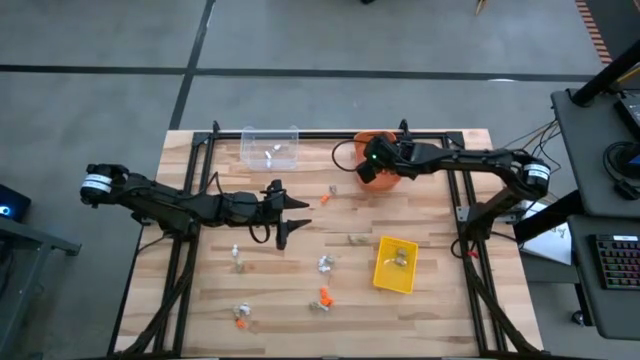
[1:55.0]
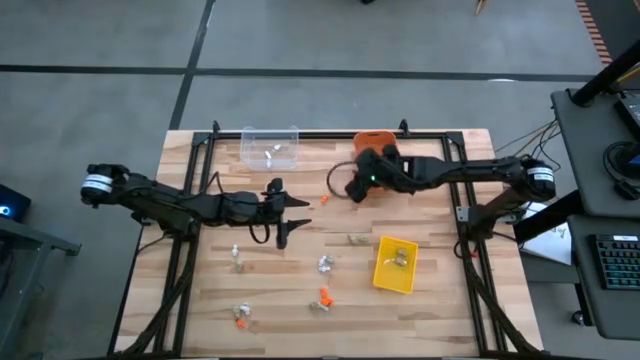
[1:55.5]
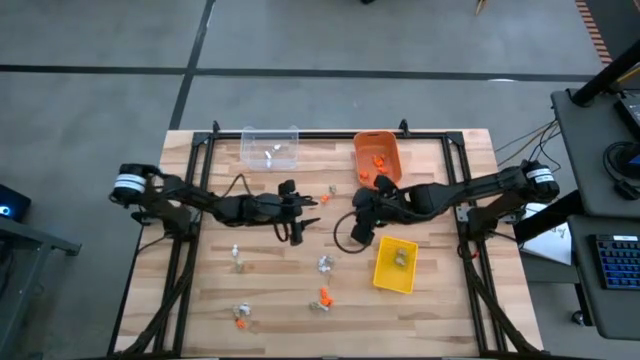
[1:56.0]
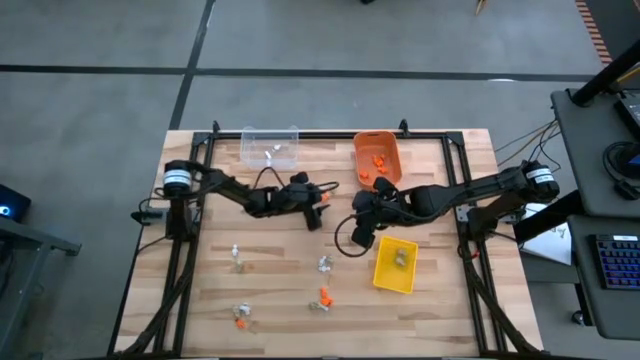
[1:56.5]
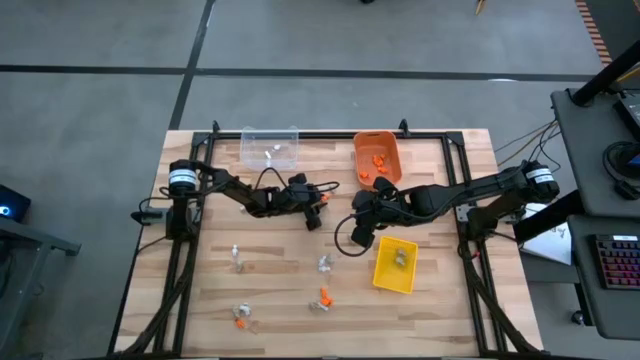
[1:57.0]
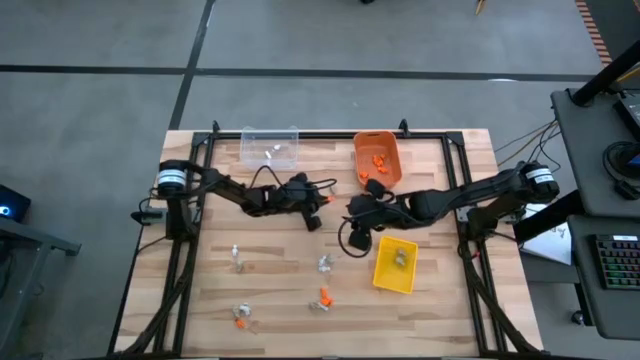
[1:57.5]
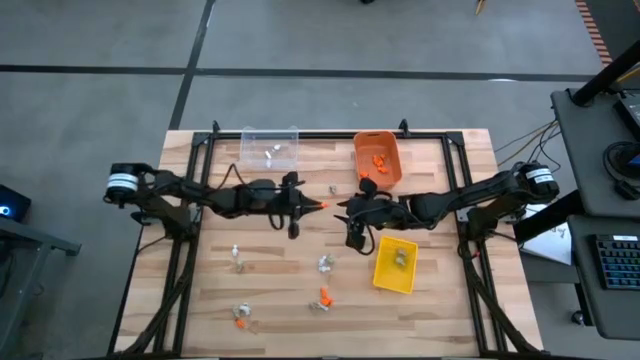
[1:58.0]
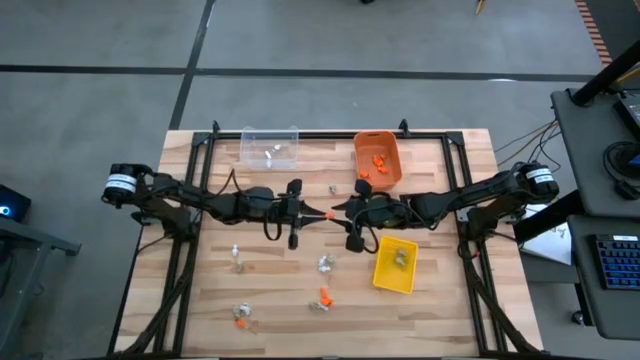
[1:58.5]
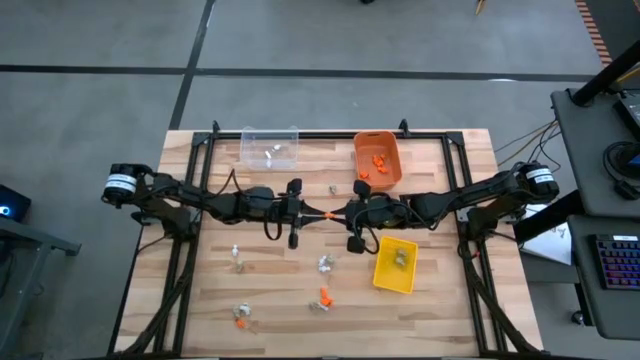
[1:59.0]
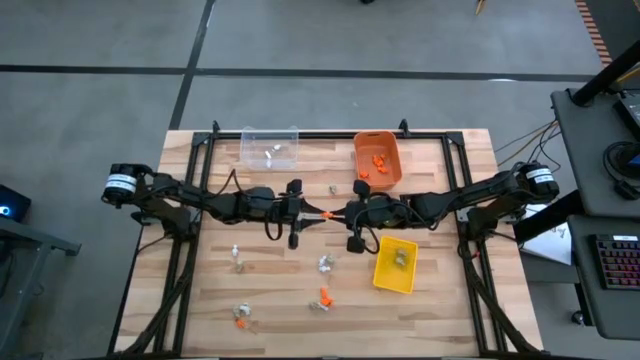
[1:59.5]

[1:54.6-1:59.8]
Task: Sort Halloween decoration
Put the orange skeleton toy into the orange bin

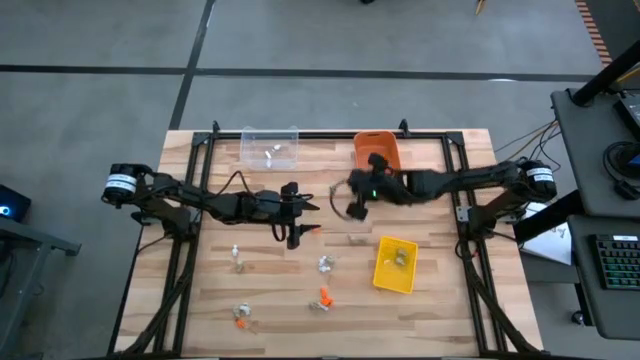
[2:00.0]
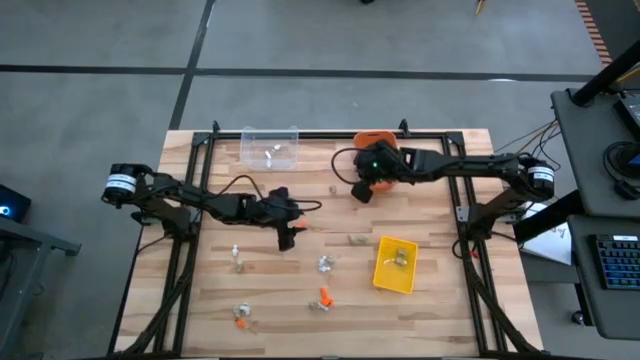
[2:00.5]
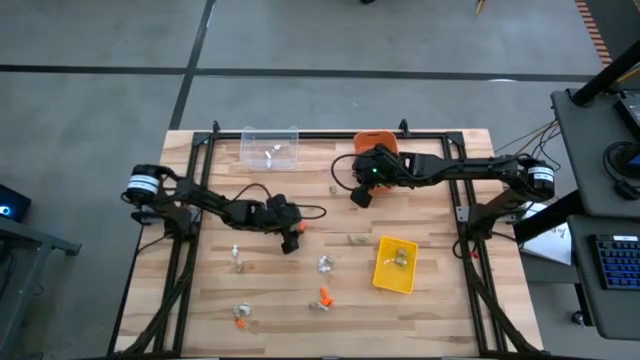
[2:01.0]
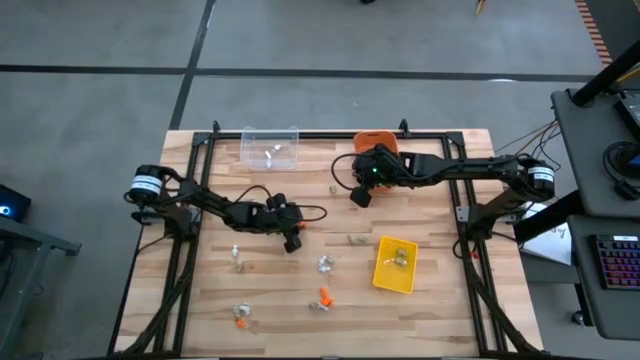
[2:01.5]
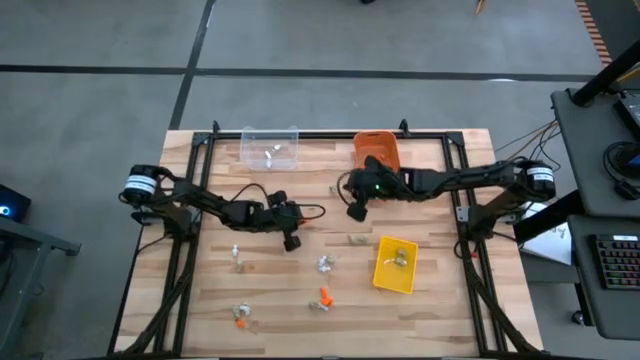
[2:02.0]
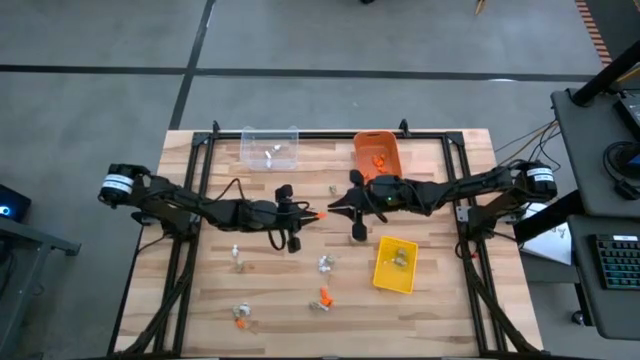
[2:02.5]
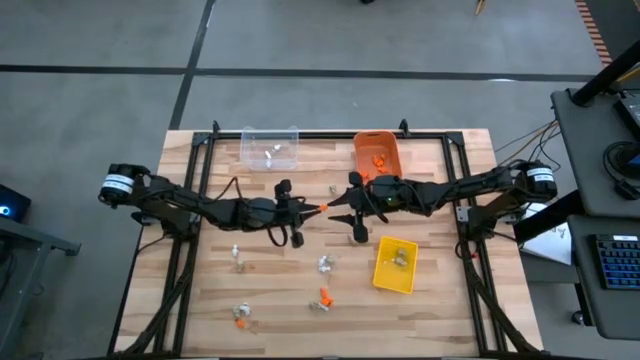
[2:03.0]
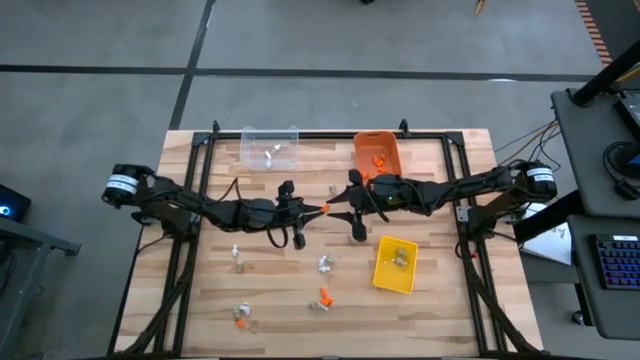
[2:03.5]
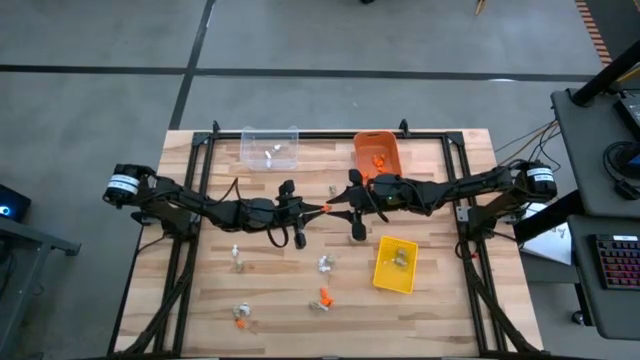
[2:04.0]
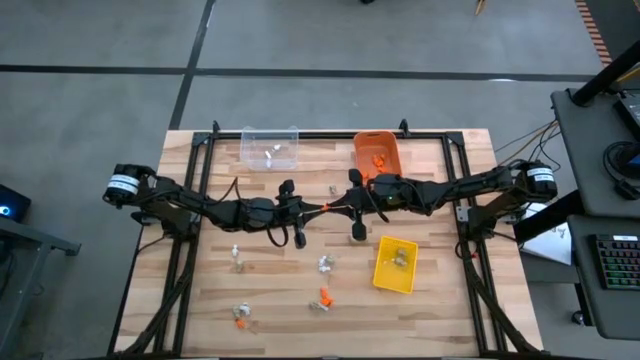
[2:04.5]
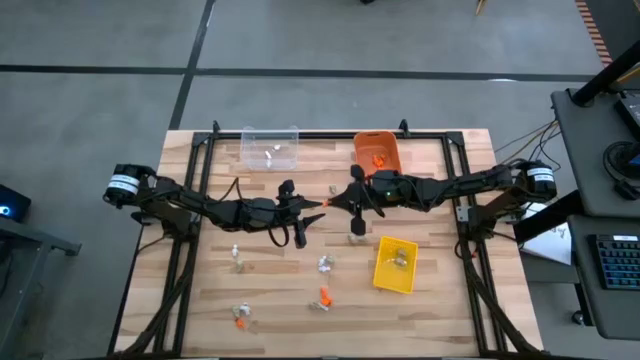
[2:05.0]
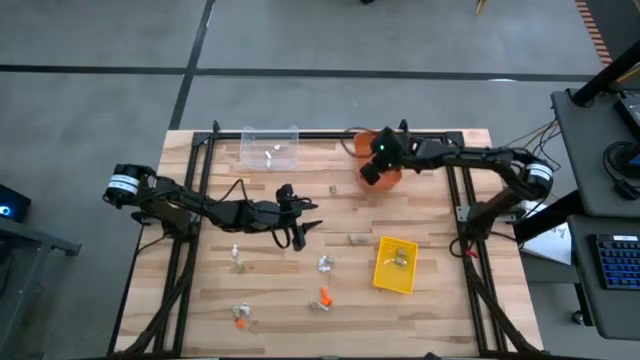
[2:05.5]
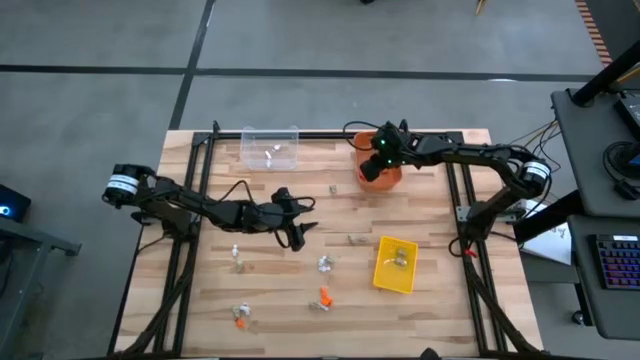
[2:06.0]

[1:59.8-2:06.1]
Put the orange skeleton toy into the orange bin

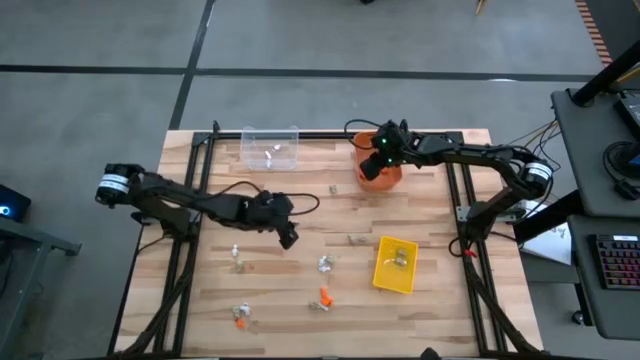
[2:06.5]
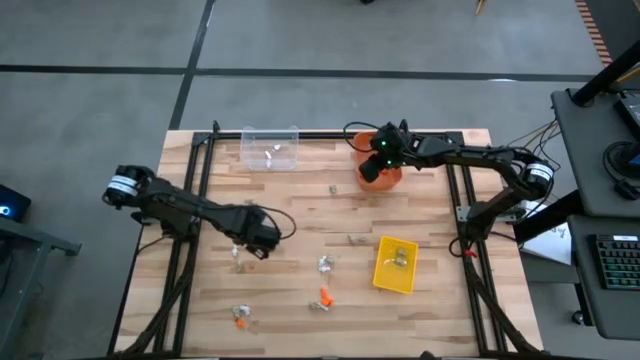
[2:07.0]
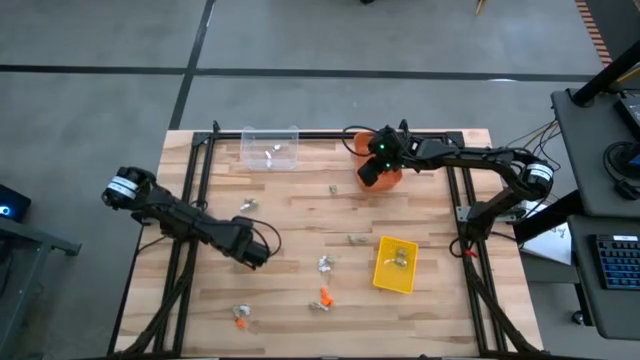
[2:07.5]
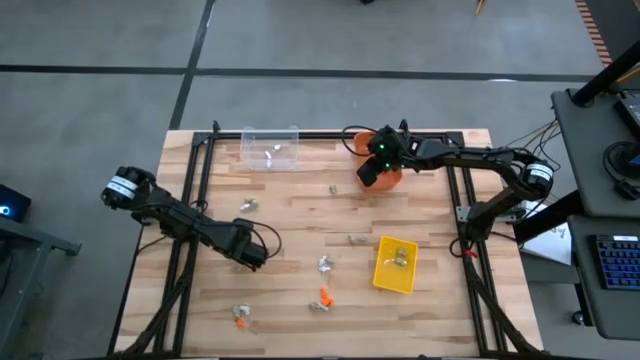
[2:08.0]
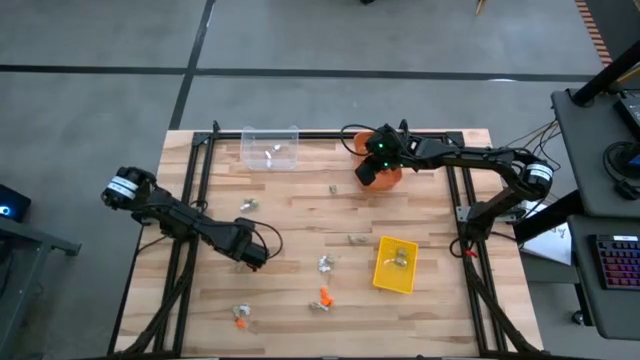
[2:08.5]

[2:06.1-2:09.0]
Put the white skeleton toy into the transparent bin

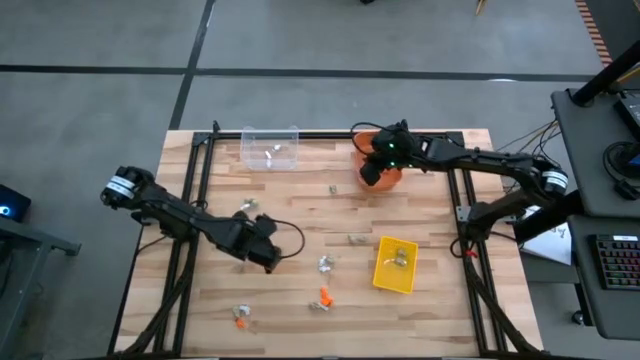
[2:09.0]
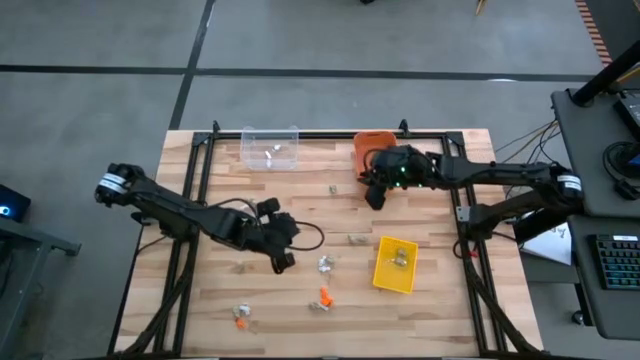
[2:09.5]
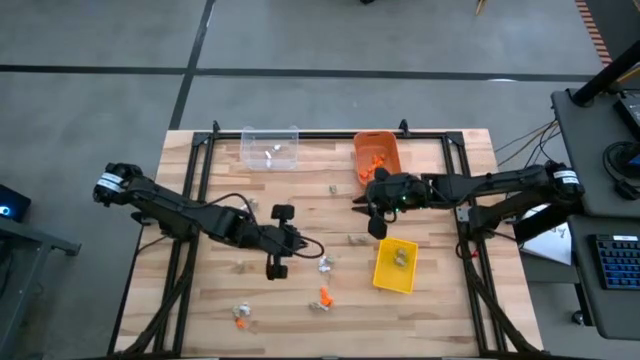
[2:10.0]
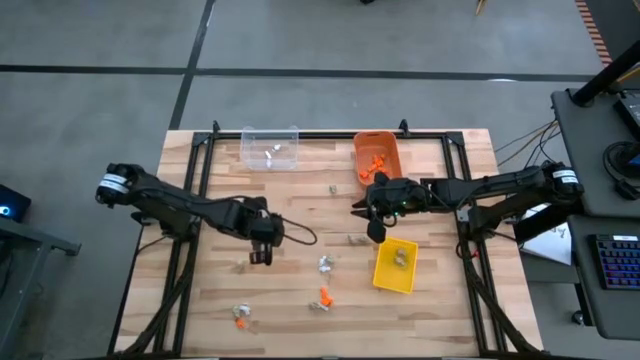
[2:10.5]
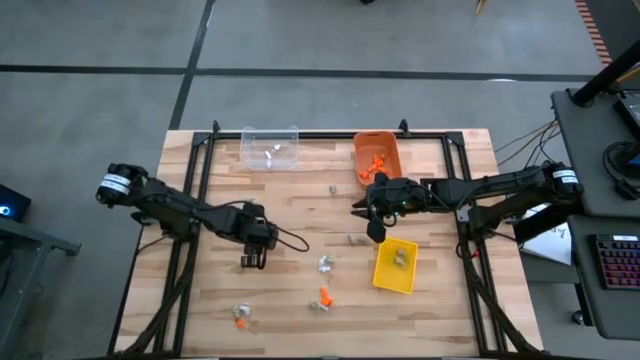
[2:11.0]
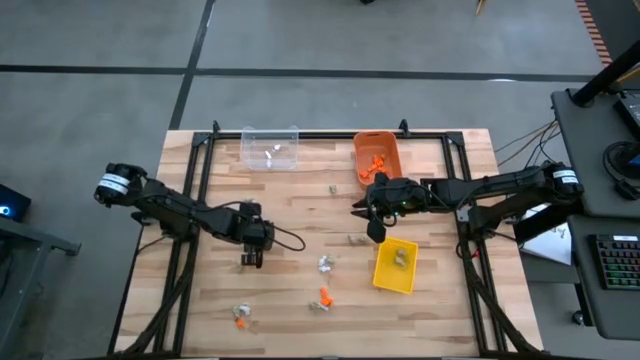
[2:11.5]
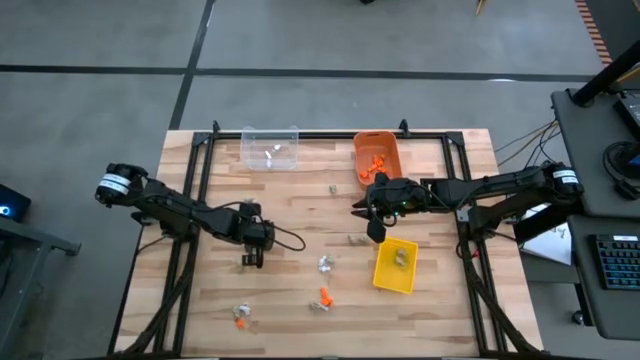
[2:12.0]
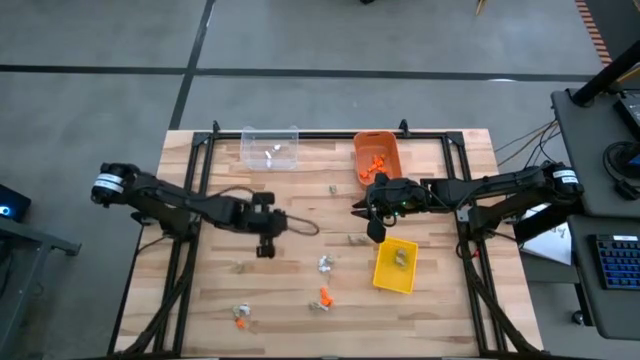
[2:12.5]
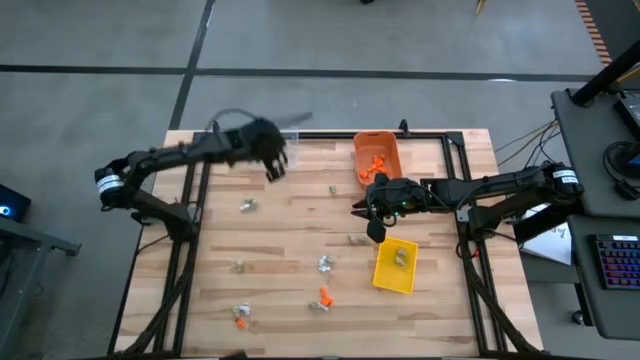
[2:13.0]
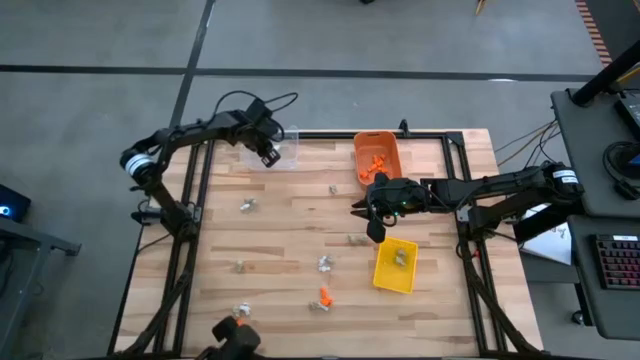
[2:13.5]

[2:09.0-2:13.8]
Put the white skeleton toy into the transparent bin

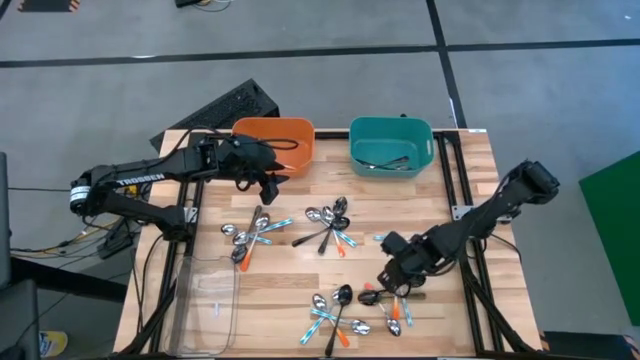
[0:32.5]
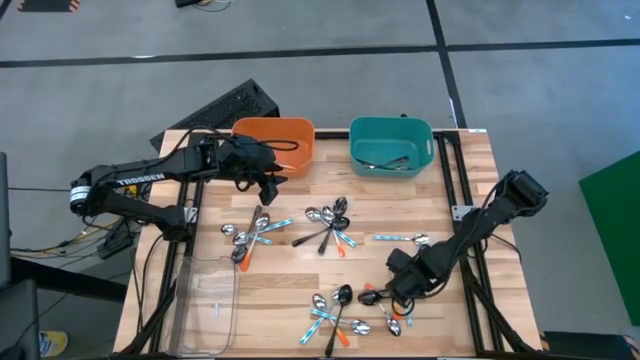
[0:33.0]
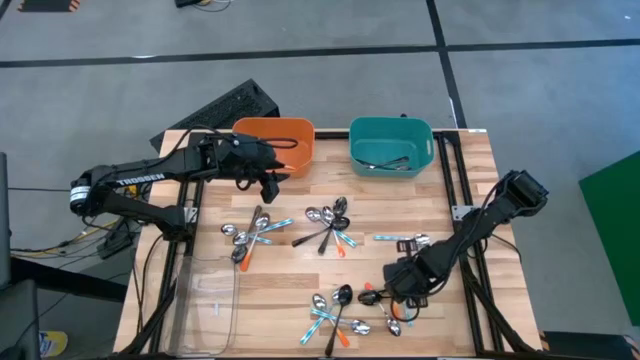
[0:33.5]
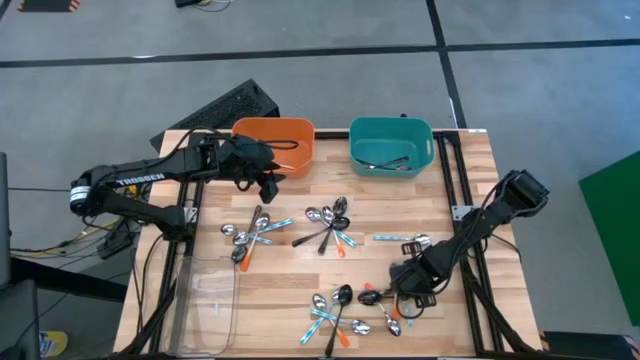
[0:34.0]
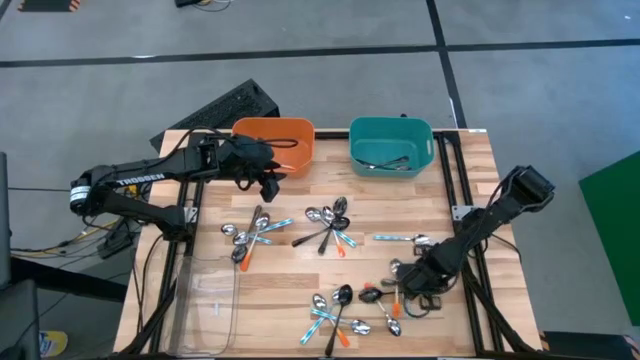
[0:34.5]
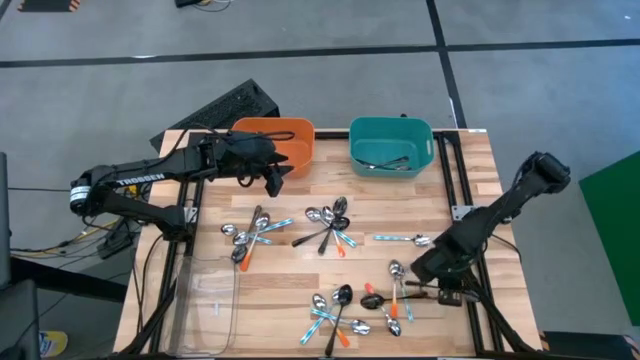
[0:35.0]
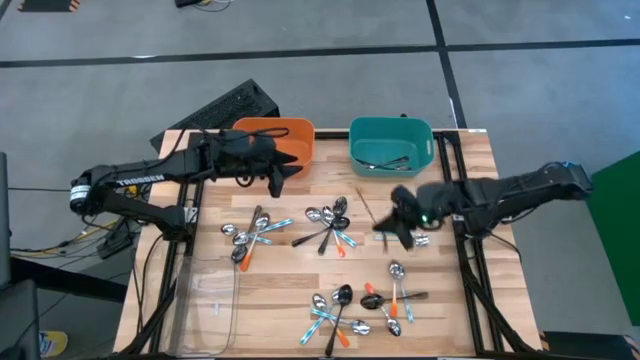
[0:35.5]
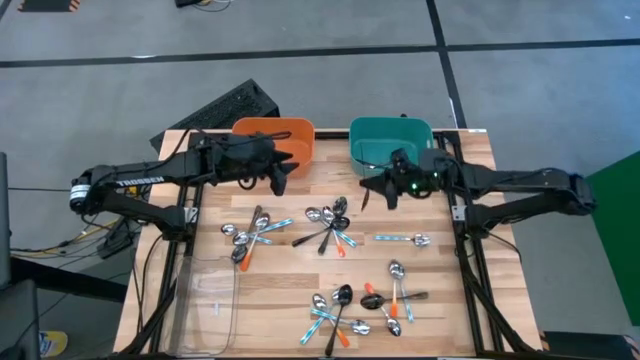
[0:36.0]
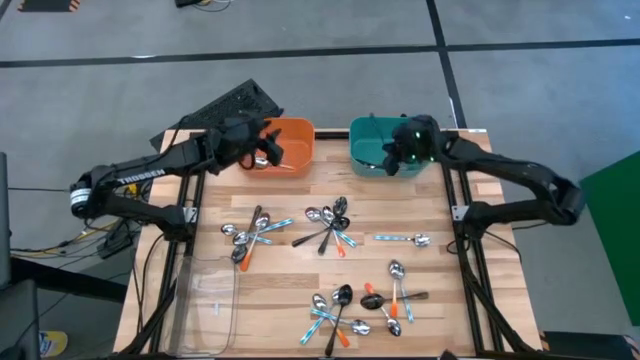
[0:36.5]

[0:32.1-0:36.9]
Task: Sort silverware by color (type)
Put the black spoon into the blue bin
